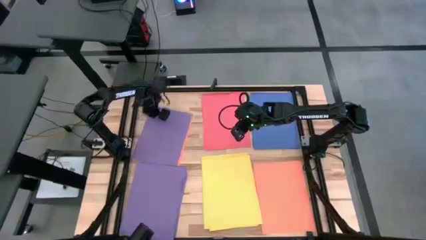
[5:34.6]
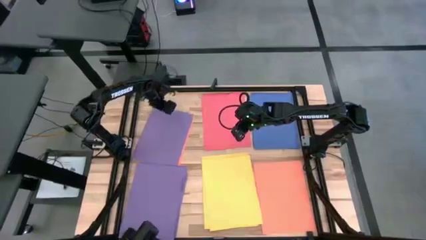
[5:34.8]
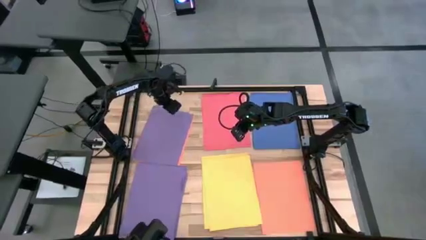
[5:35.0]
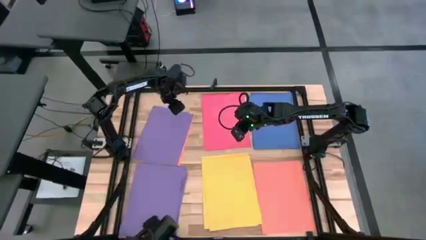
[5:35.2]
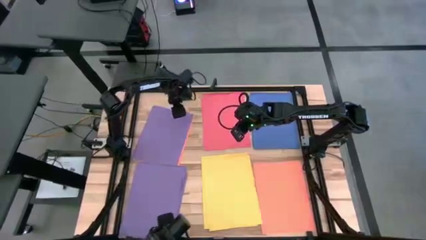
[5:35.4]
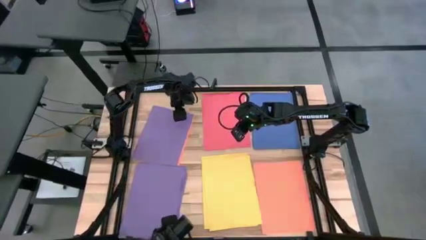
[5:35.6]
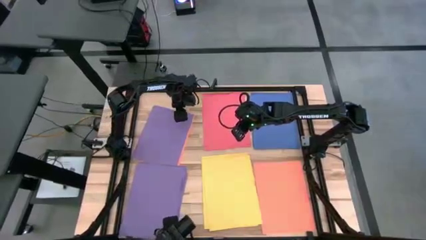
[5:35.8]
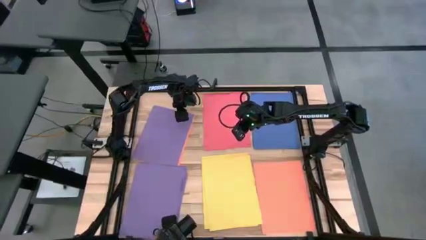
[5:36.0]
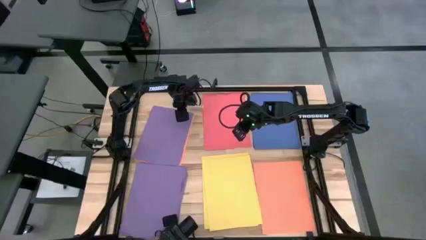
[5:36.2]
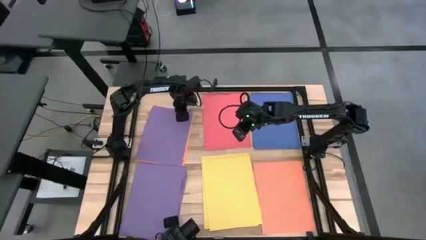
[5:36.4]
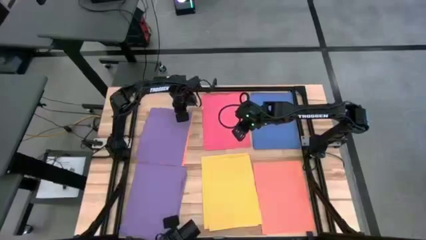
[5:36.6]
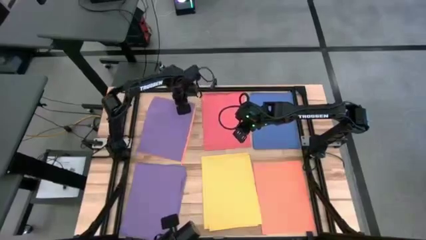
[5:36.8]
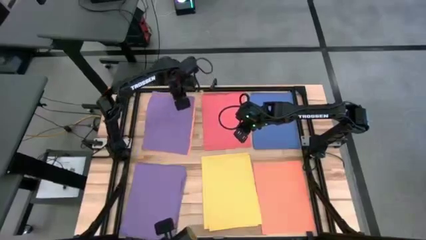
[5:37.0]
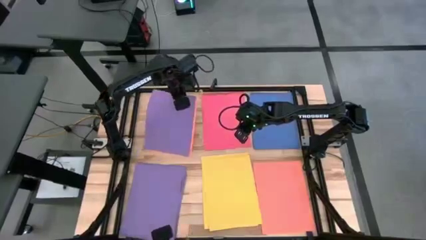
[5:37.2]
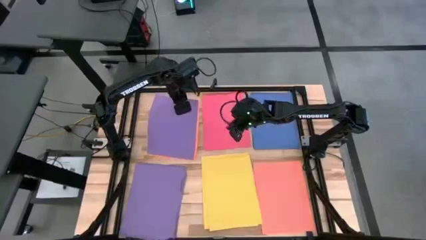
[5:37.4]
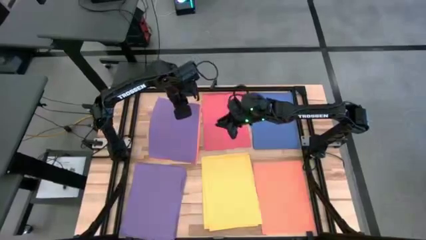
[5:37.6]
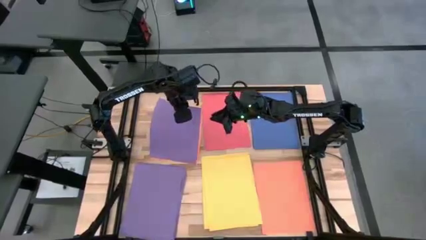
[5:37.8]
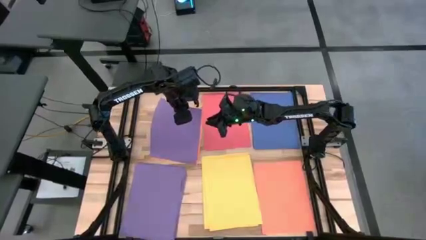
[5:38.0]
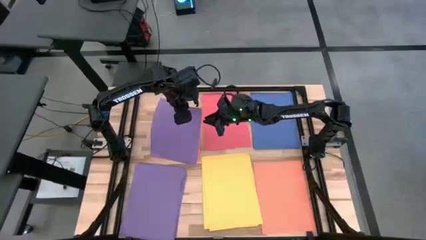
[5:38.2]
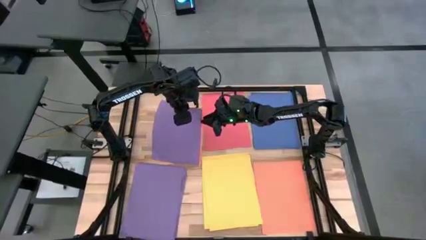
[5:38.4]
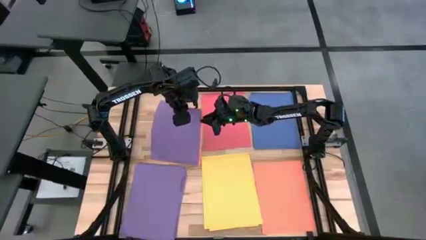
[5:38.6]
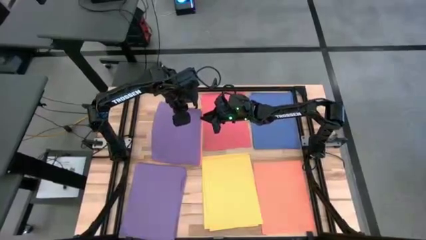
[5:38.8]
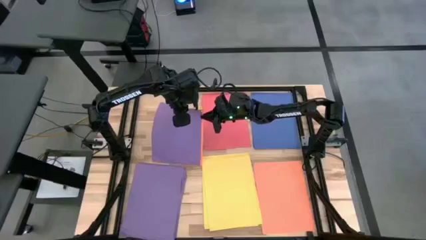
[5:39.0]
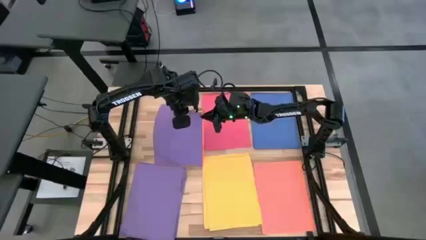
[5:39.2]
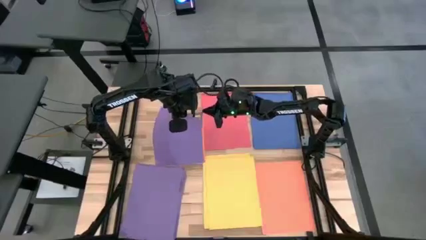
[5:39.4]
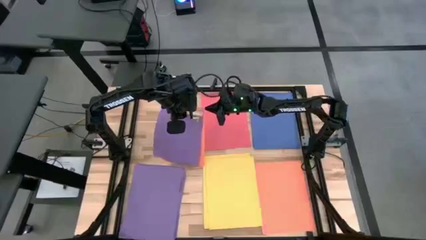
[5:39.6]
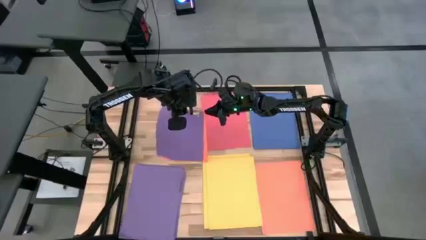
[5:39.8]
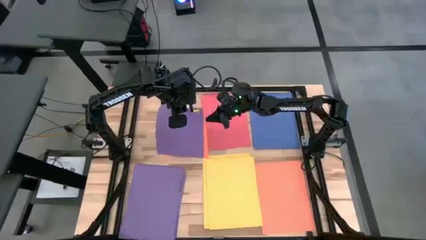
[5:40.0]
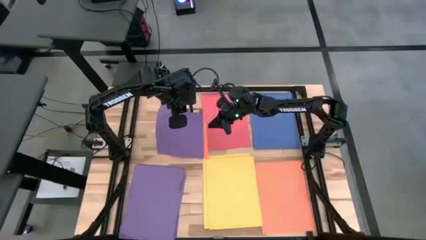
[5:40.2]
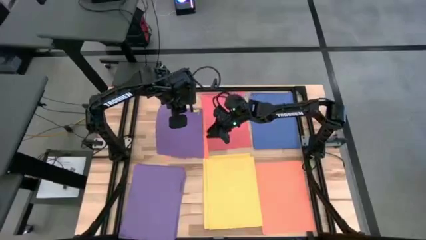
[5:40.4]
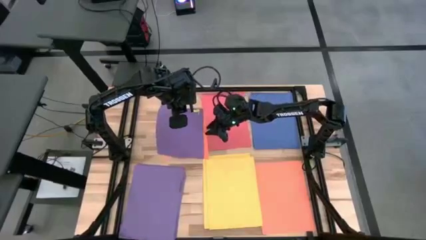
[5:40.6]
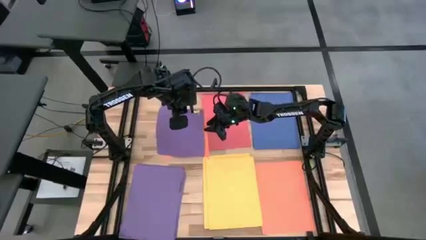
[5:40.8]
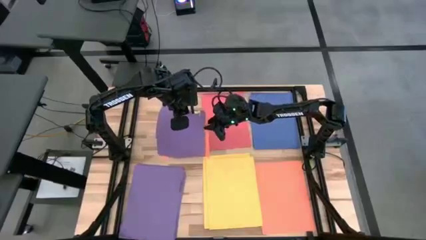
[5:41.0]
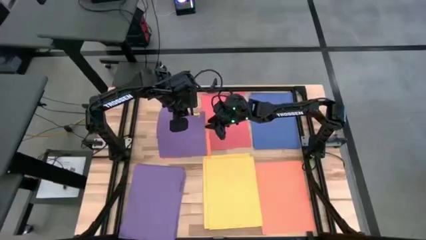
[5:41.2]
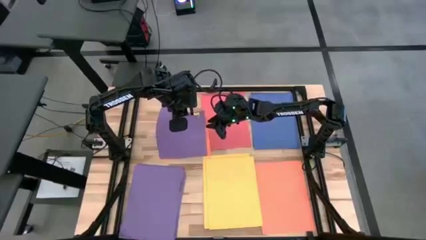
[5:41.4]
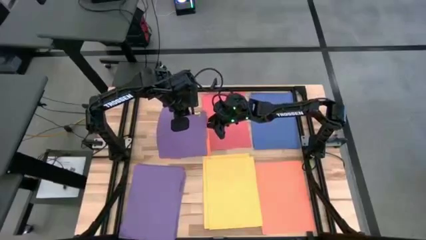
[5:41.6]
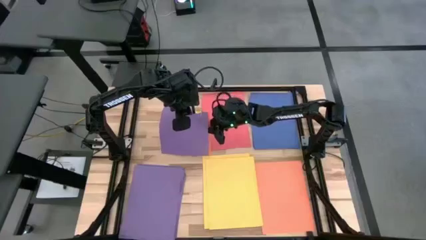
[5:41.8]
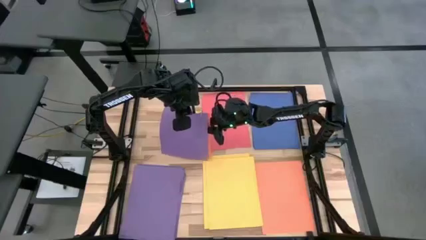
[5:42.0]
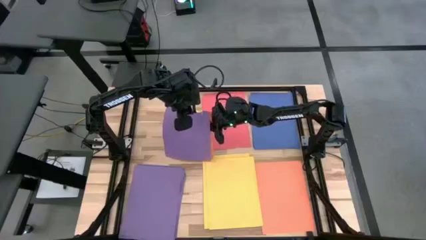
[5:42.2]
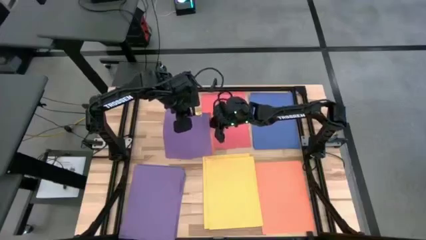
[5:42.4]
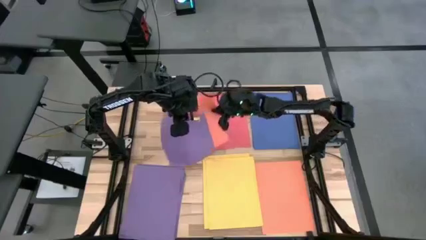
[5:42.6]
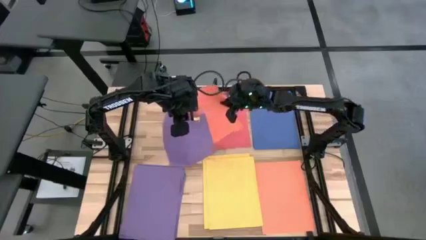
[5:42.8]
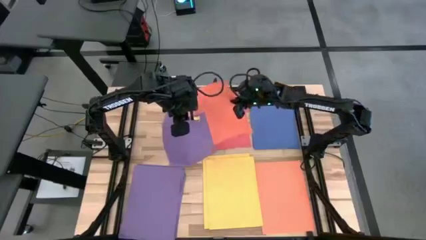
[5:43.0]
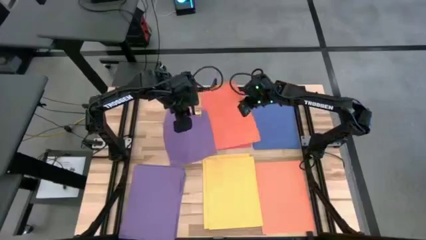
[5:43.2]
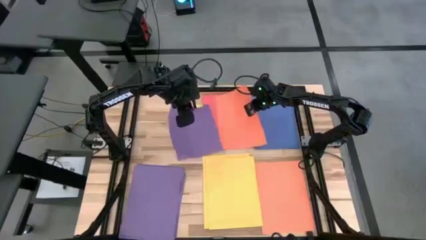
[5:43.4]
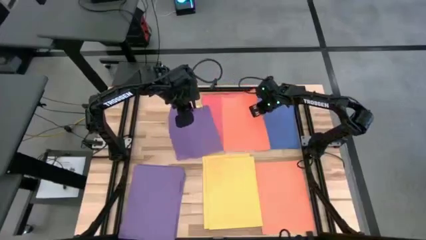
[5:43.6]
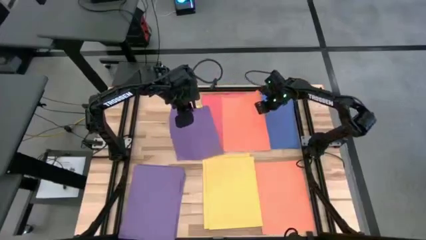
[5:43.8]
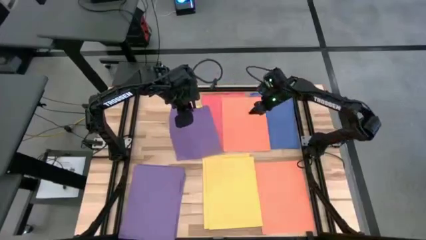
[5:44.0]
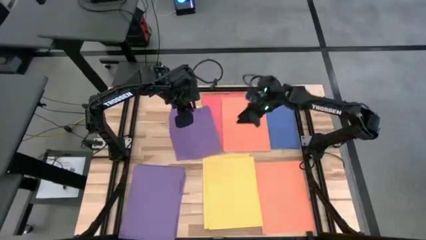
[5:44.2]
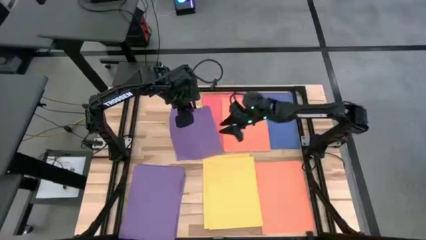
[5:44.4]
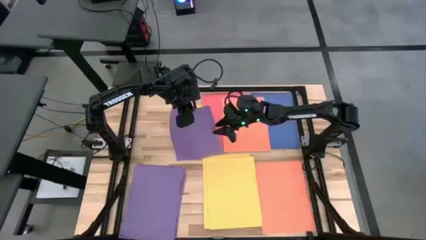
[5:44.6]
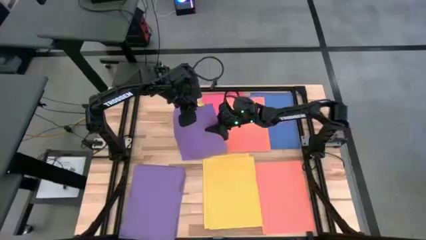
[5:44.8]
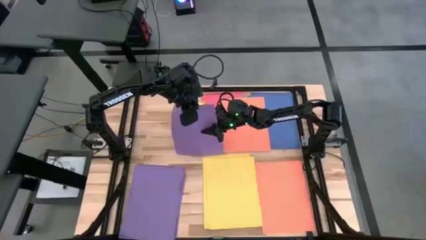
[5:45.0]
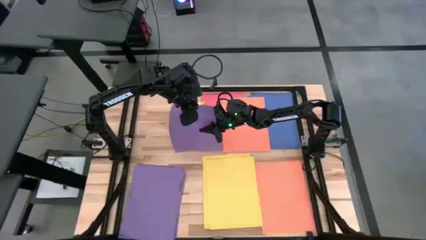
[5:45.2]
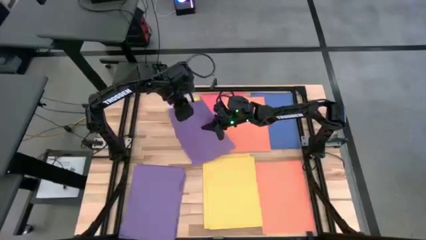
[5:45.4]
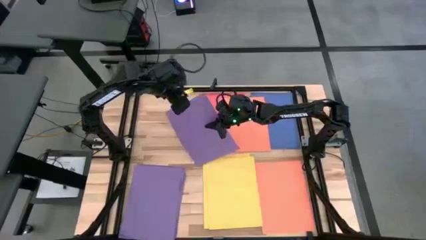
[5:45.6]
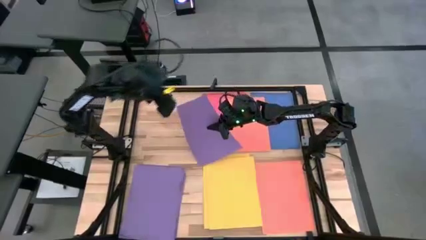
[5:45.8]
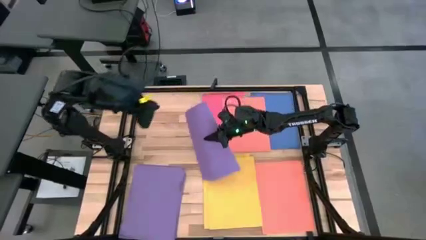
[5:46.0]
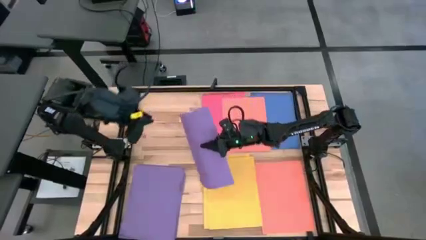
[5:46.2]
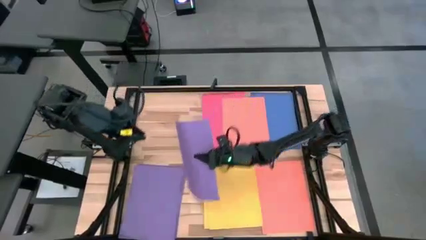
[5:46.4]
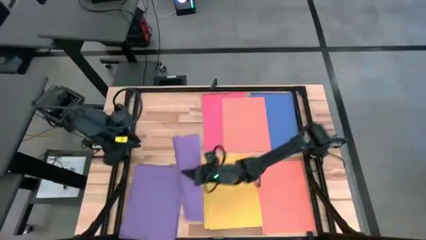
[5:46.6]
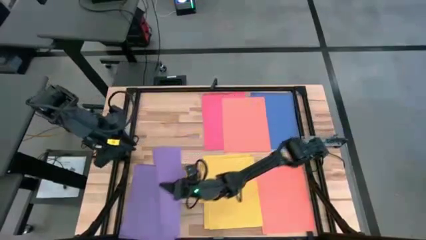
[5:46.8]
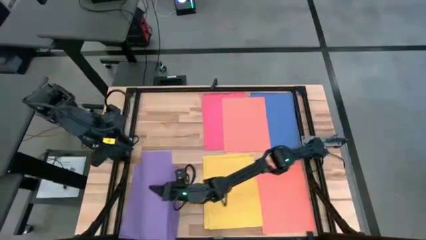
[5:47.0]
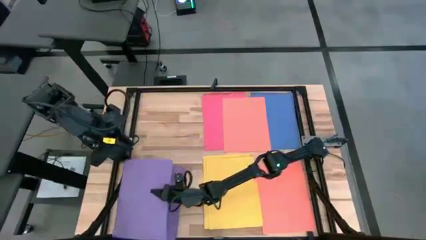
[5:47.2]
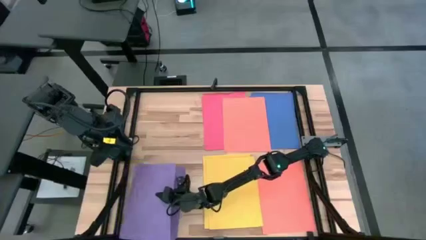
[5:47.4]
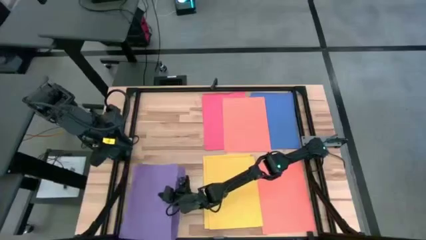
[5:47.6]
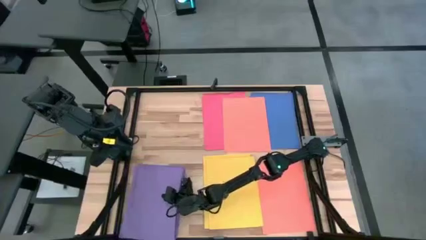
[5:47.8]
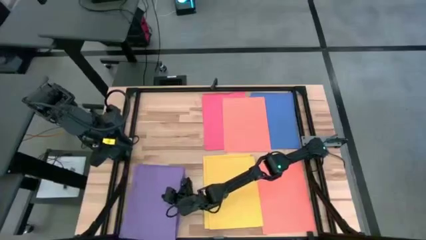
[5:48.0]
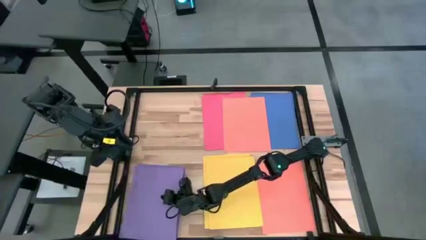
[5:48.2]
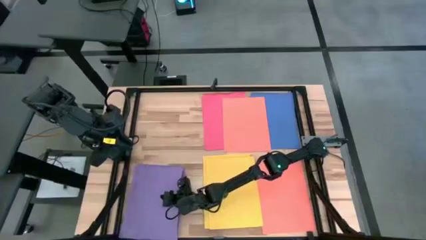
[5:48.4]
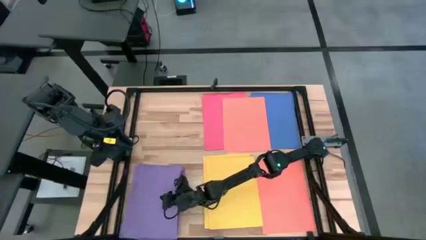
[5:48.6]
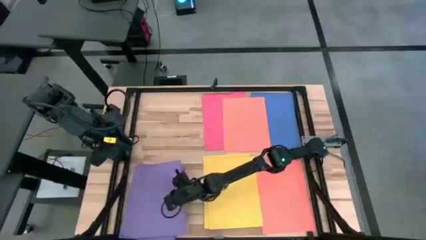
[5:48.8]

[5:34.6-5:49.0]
Task: Organize paper
Stack the purple paper on top of the purple paper
